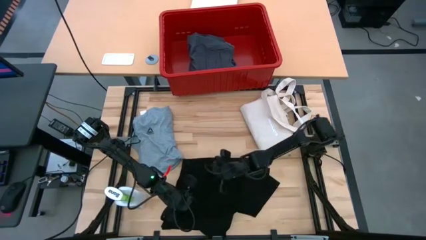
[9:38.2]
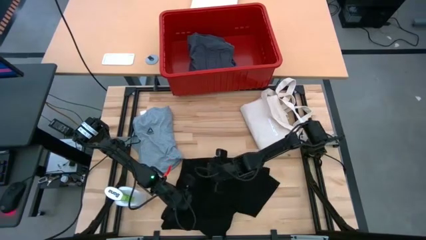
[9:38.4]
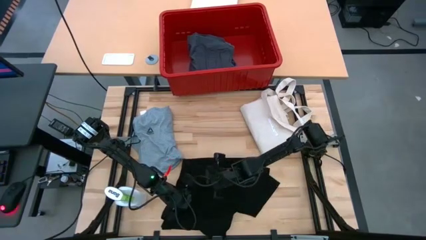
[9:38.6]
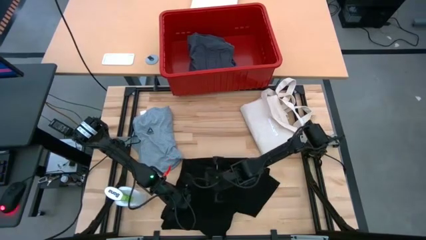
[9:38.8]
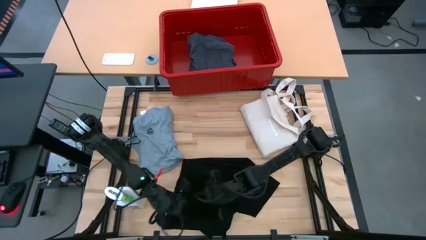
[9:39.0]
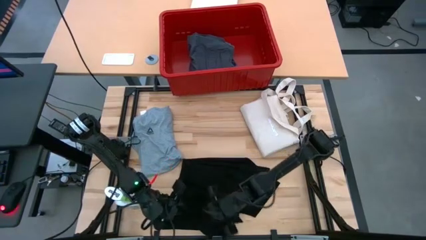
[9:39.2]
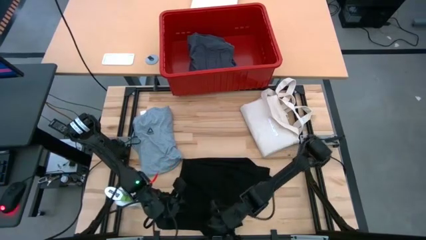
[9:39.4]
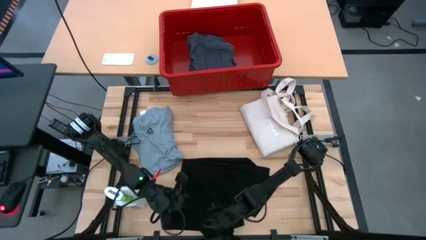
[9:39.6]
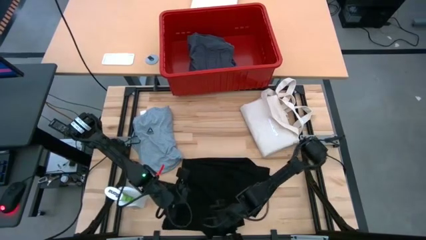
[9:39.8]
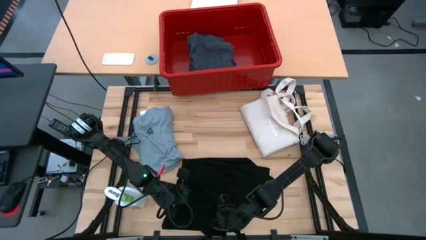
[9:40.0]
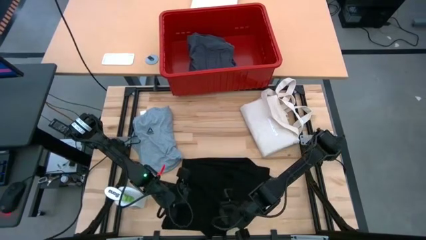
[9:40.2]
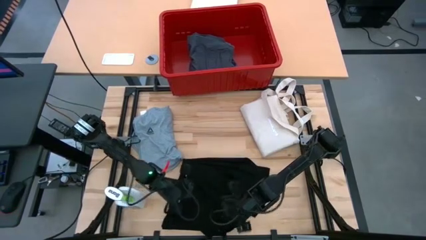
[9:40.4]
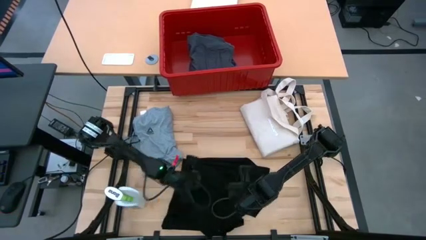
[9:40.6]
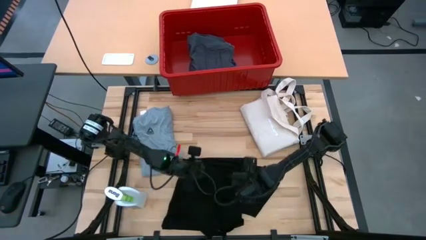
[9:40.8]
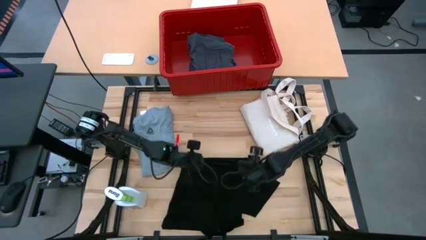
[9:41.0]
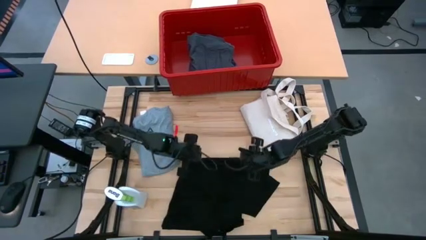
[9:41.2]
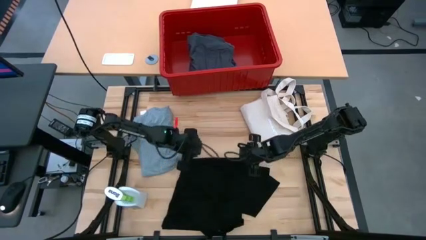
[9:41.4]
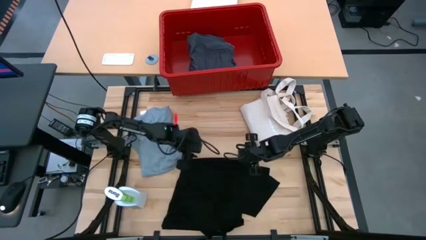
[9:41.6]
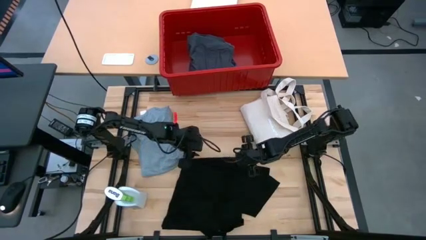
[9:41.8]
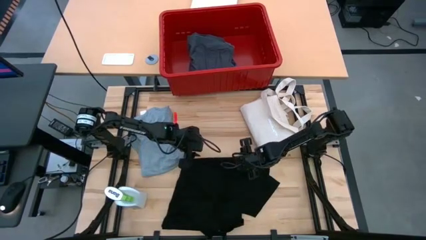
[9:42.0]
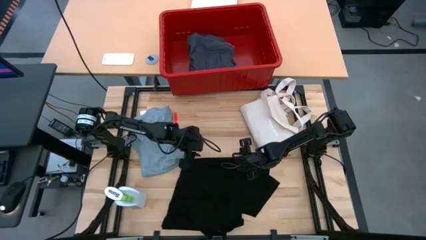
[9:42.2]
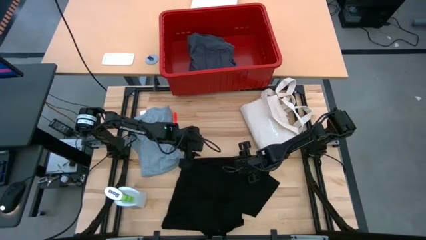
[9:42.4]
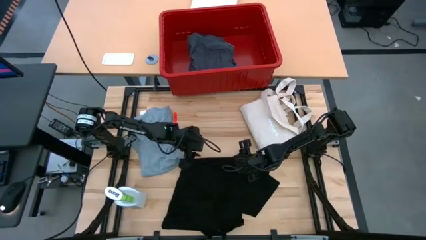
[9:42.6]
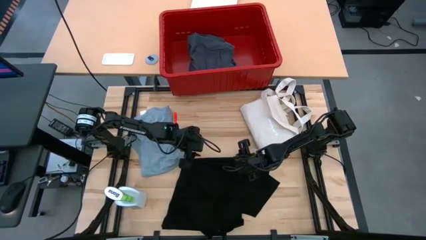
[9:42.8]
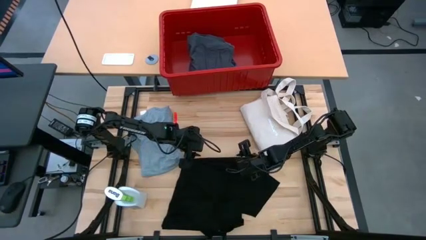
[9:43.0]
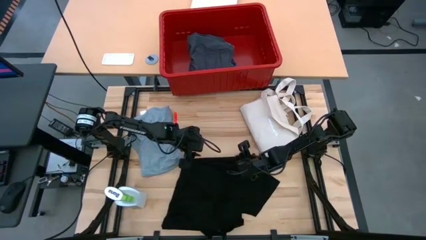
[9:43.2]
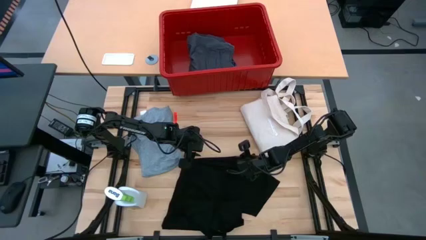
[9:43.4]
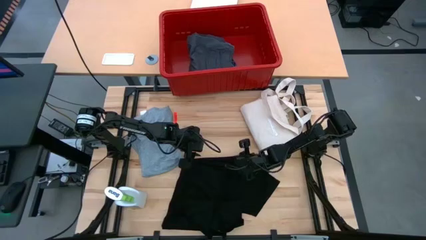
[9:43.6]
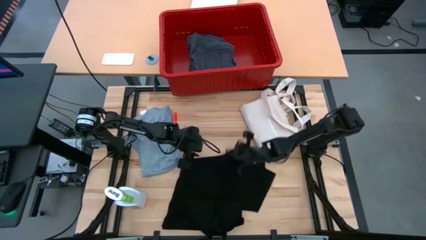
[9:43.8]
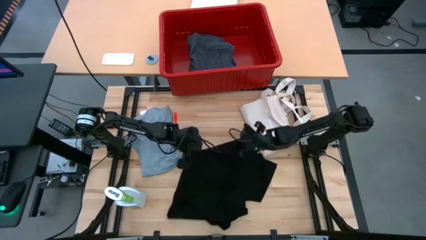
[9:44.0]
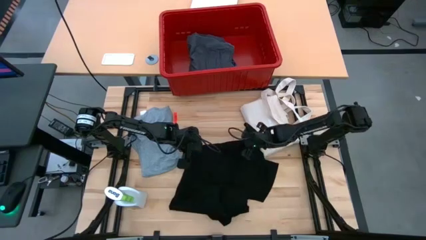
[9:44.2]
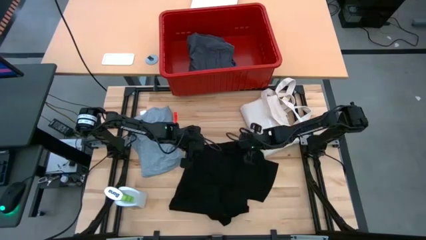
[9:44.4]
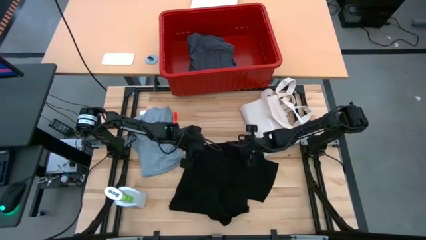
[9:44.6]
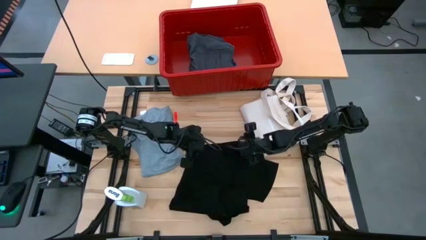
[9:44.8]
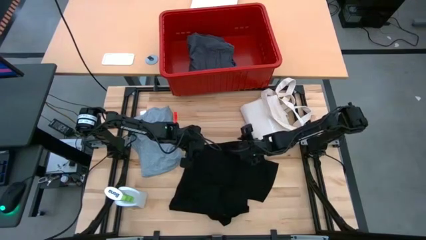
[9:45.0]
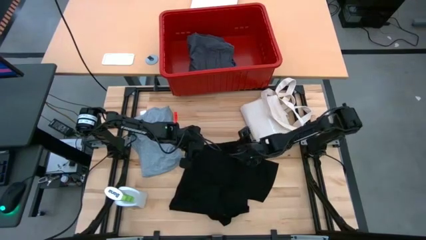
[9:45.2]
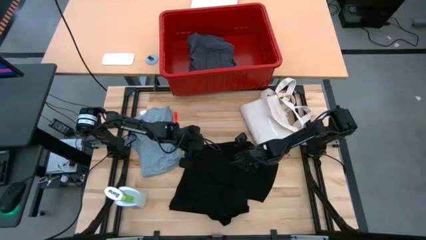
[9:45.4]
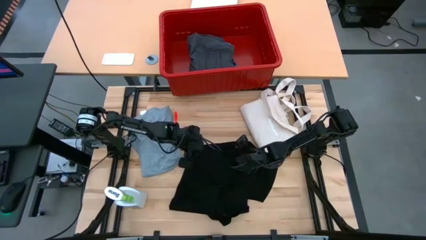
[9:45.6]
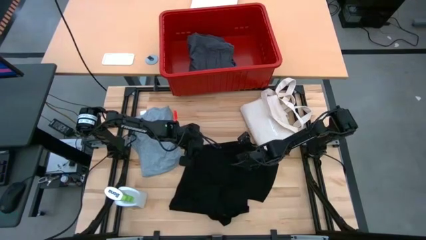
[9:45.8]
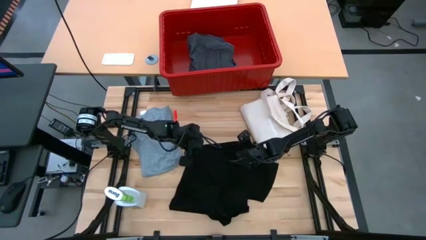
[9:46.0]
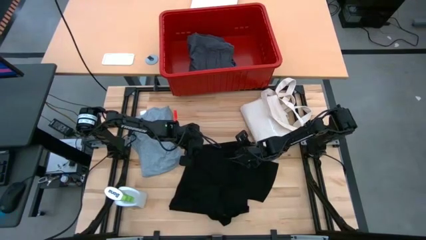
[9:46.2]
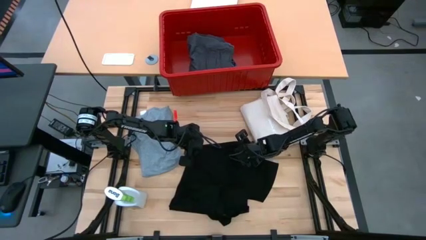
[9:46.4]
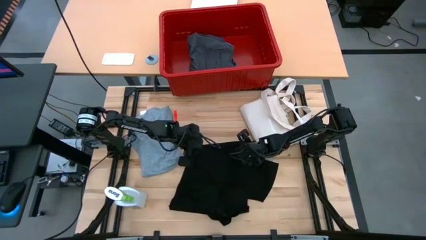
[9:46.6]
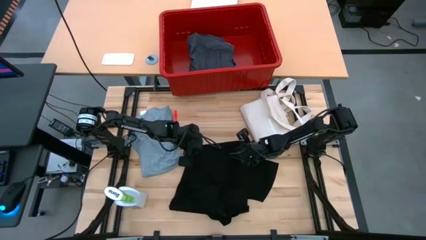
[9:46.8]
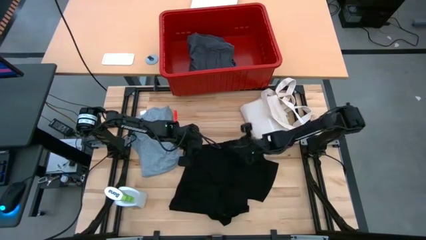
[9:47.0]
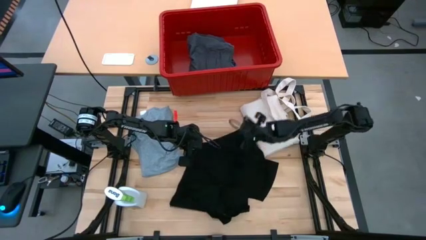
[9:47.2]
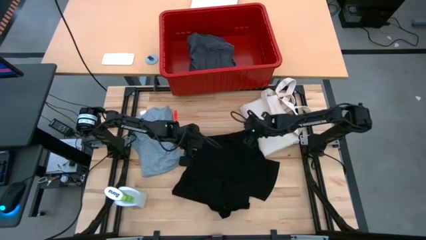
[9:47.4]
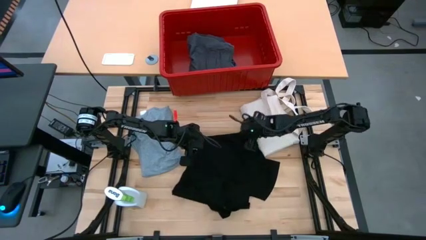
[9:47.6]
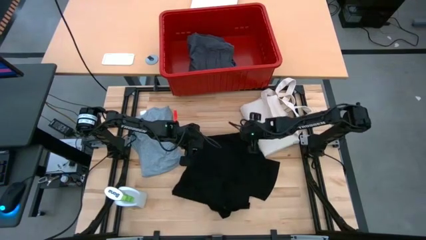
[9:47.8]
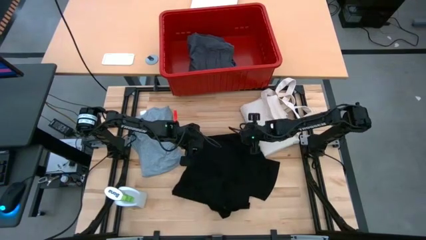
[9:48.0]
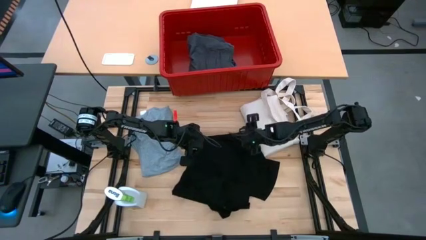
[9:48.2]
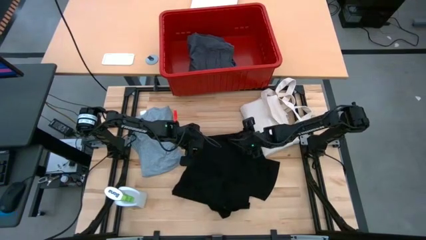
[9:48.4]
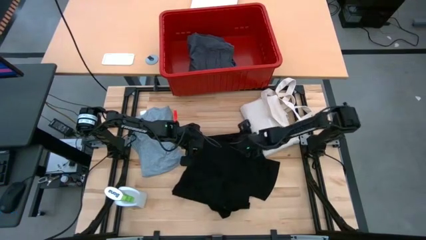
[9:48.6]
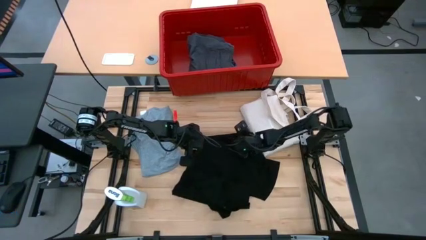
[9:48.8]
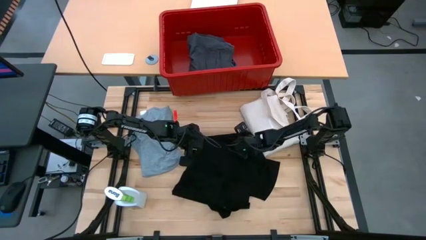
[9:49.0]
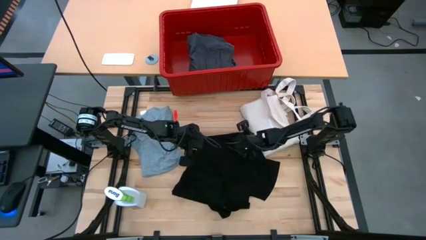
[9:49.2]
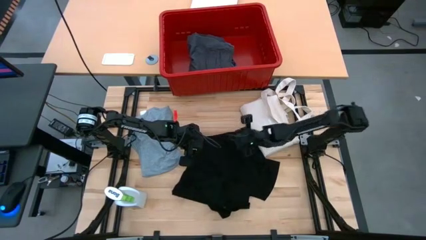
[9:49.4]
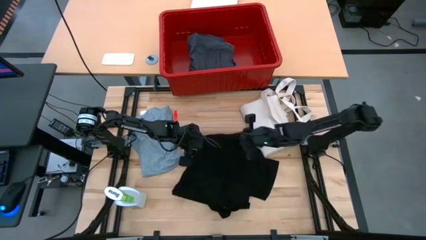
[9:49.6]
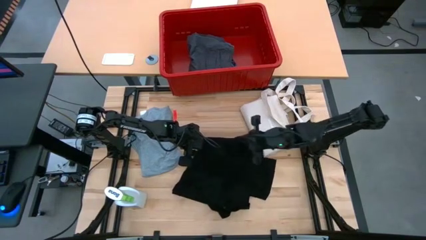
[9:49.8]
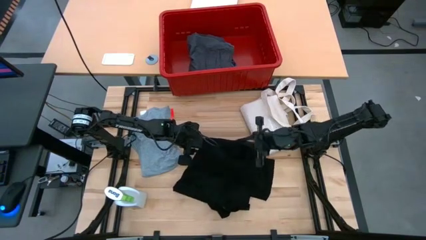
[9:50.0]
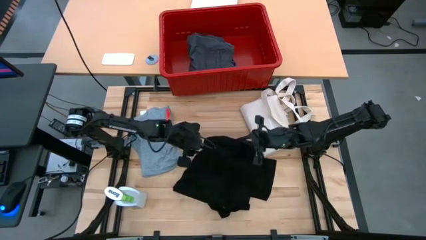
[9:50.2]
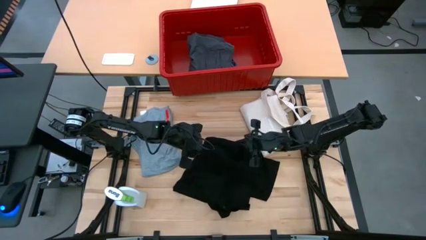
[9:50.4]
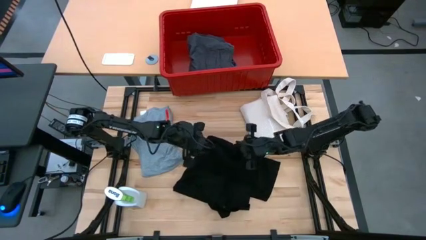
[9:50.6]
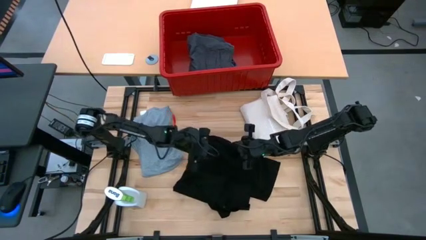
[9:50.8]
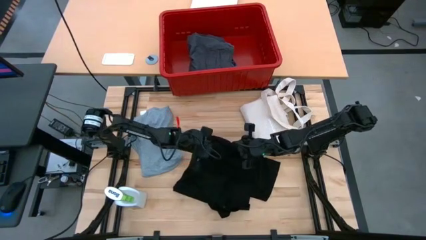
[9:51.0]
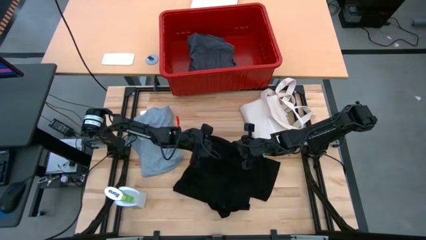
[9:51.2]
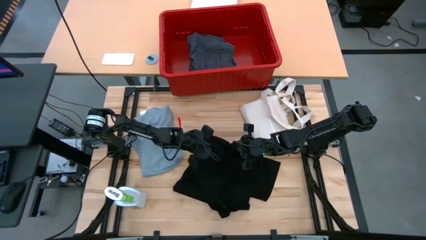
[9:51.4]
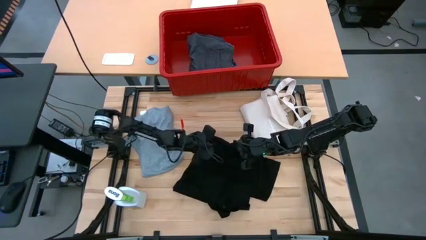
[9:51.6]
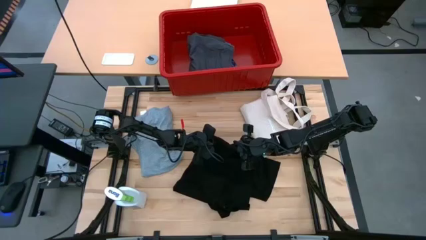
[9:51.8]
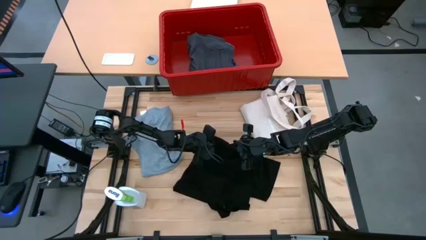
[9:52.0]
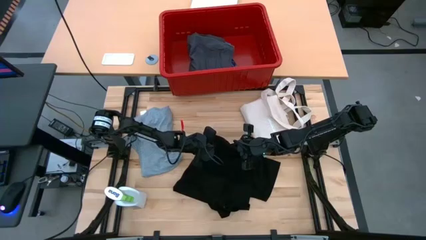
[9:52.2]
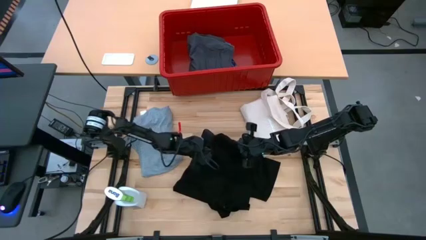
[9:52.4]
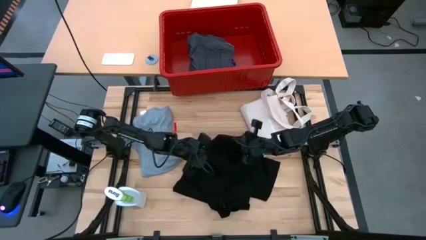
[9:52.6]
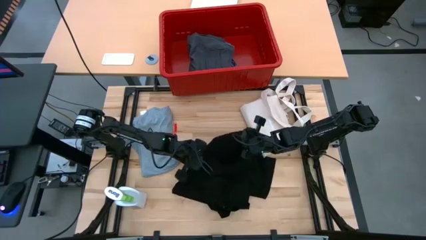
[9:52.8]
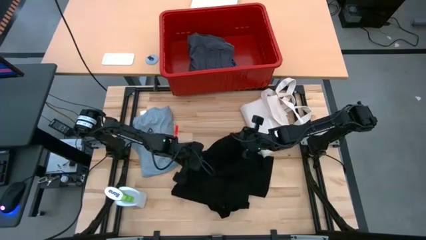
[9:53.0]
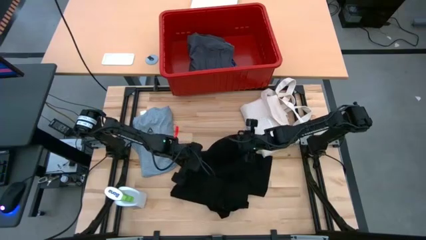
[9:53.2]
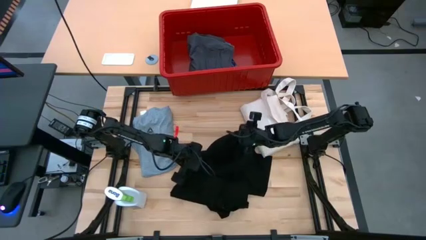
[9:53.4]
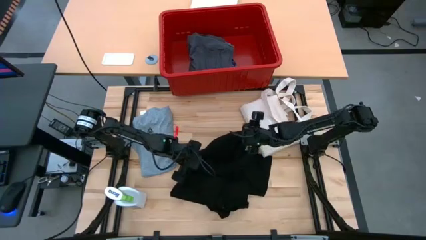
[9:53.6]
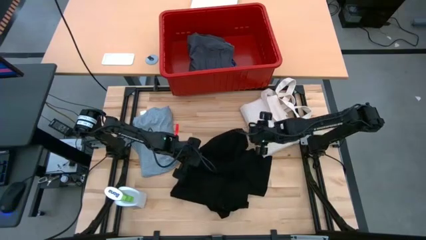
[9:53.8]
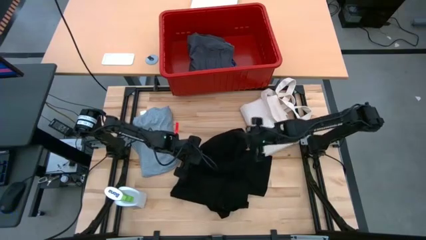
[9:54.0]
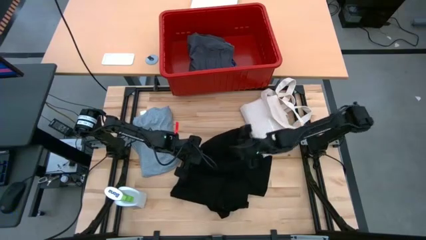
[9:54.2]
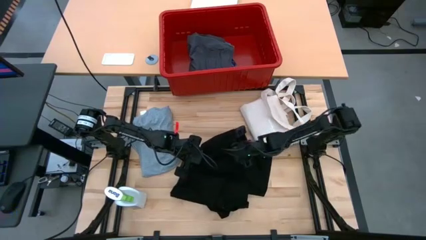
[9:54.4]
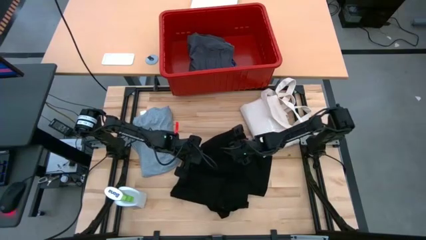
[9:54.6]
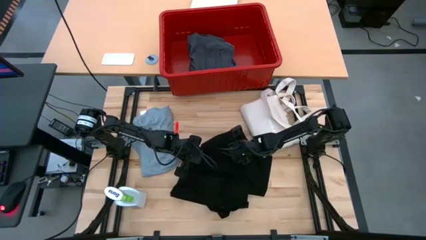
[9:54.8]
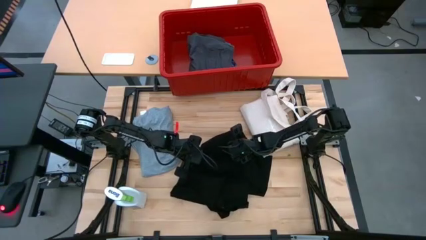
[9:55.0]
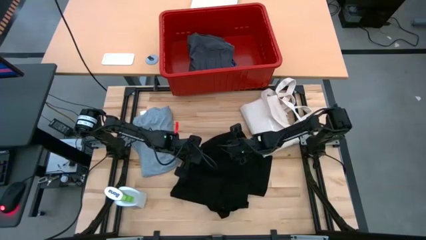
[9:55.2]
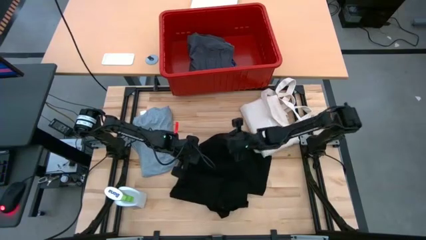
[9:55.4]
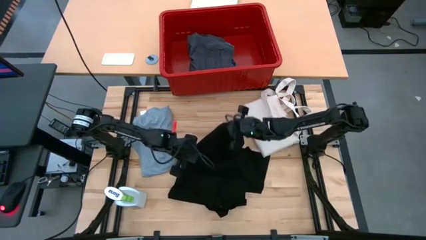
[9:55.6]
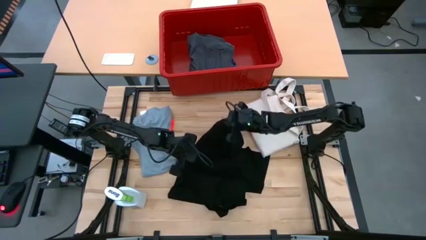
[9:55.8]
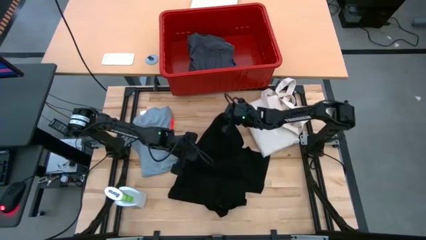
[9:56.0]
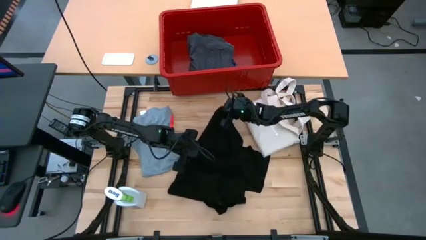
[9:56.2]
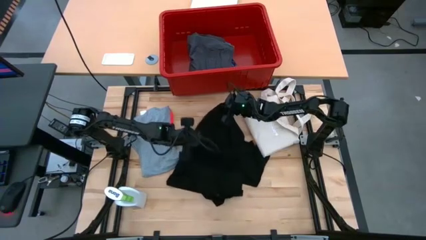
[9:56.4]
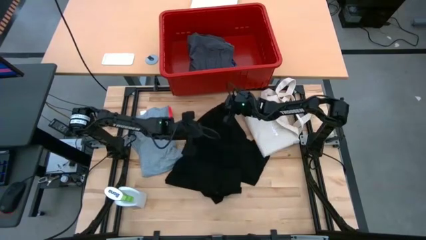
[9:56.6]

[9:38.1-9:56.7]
Task: Fold Laundry from Bin
Fold the black shirt
